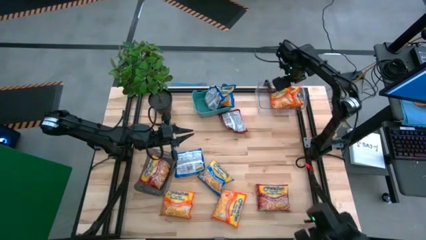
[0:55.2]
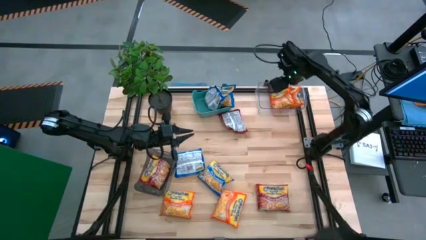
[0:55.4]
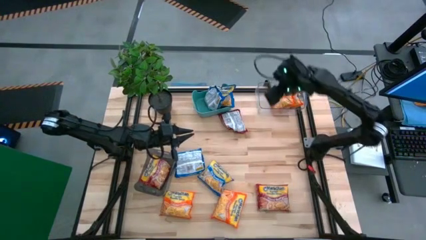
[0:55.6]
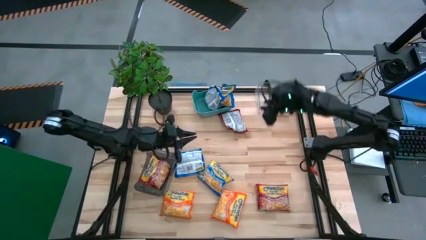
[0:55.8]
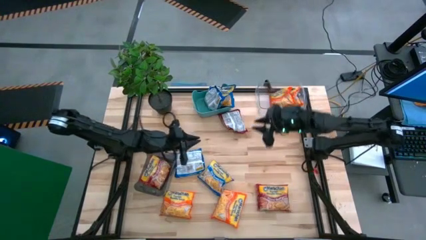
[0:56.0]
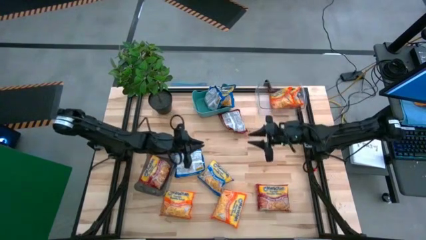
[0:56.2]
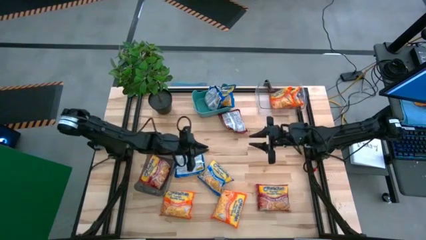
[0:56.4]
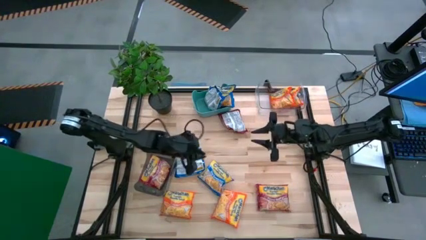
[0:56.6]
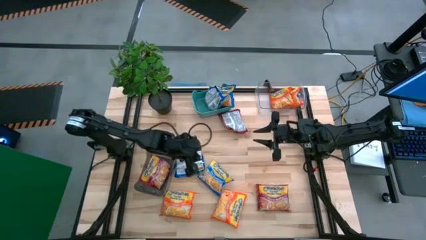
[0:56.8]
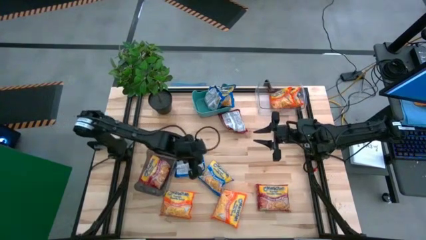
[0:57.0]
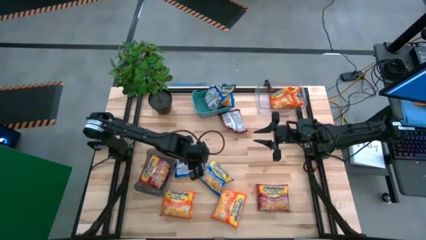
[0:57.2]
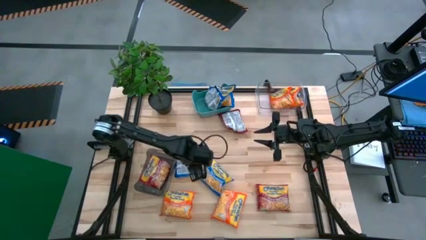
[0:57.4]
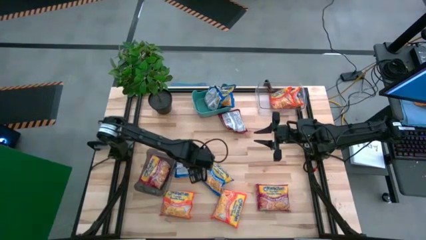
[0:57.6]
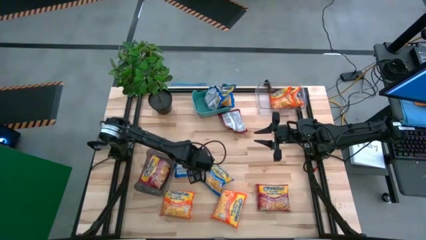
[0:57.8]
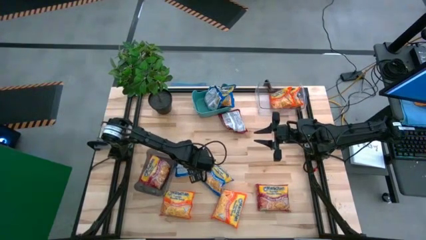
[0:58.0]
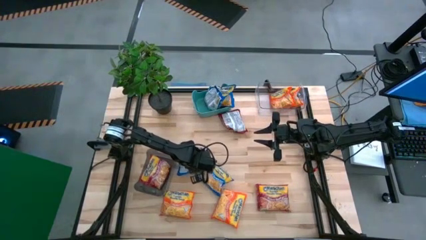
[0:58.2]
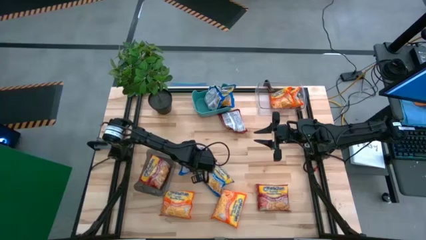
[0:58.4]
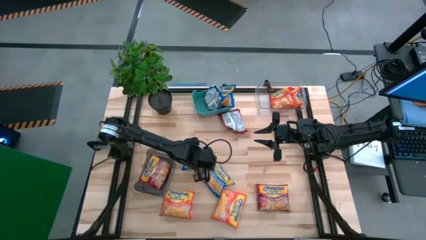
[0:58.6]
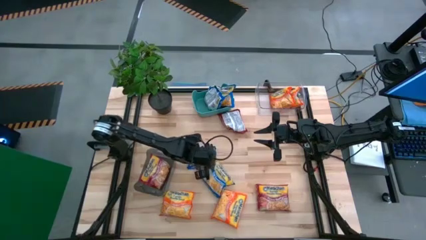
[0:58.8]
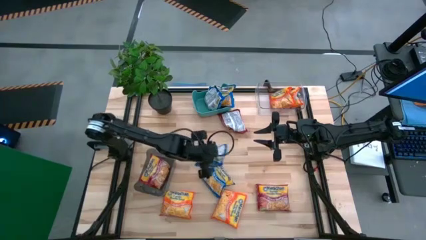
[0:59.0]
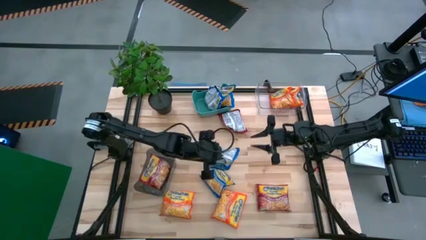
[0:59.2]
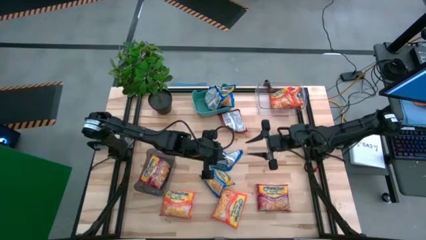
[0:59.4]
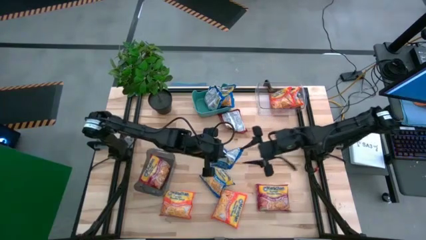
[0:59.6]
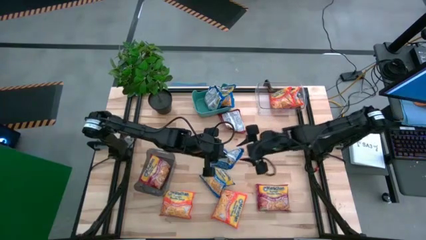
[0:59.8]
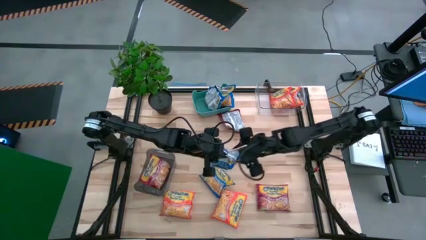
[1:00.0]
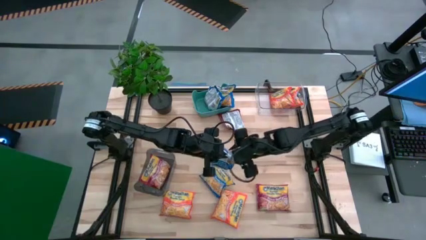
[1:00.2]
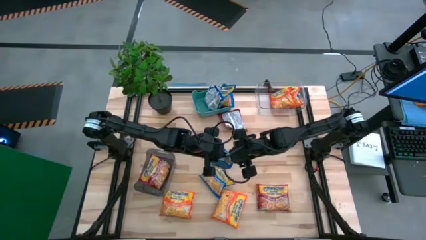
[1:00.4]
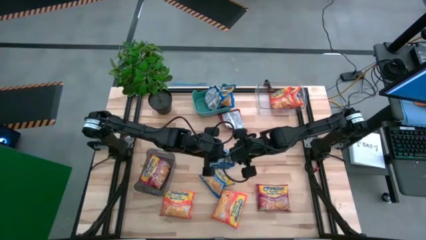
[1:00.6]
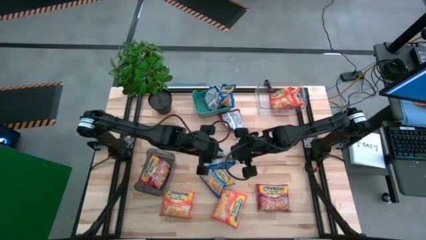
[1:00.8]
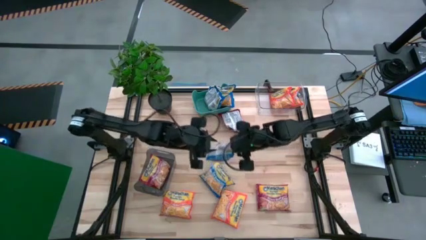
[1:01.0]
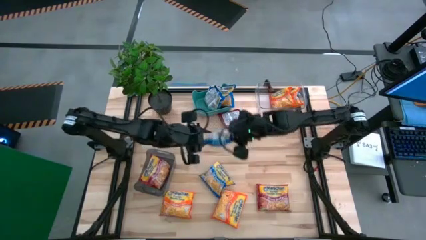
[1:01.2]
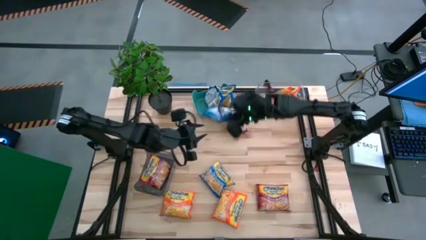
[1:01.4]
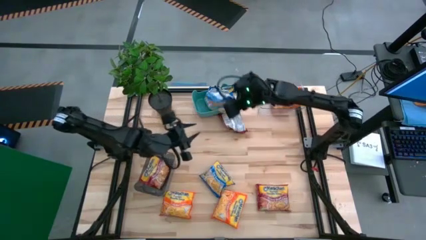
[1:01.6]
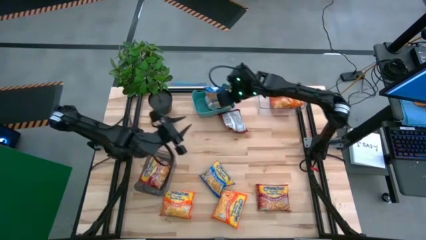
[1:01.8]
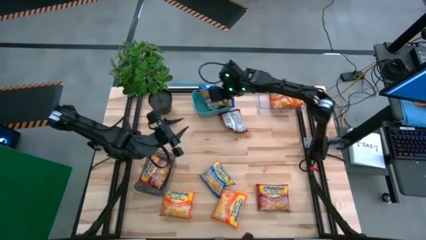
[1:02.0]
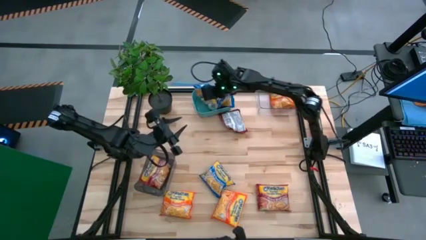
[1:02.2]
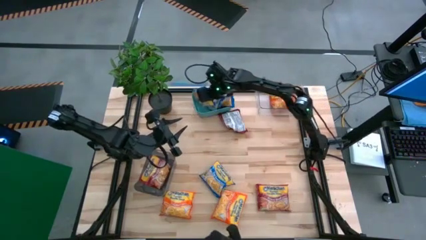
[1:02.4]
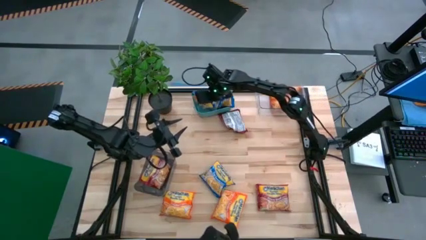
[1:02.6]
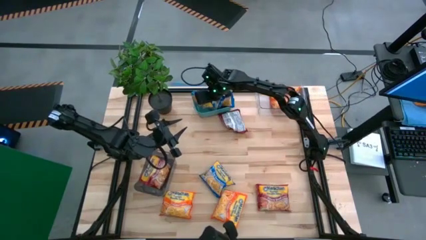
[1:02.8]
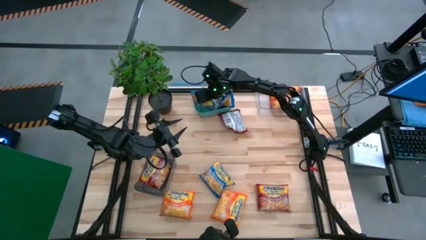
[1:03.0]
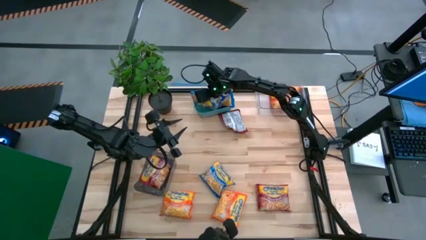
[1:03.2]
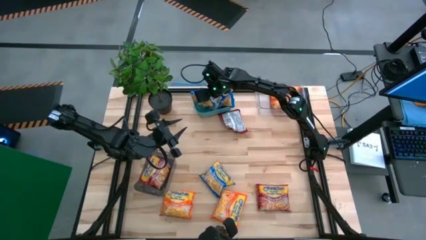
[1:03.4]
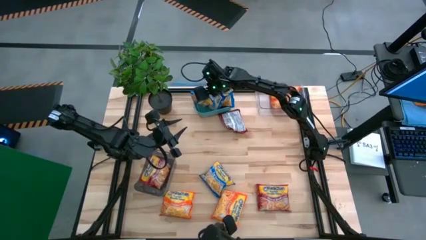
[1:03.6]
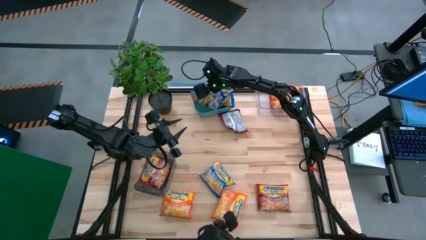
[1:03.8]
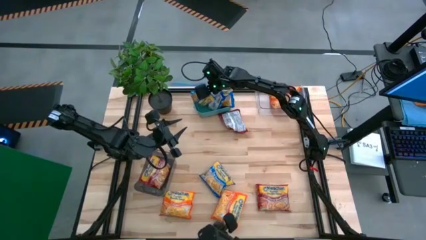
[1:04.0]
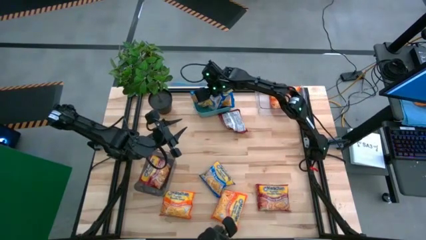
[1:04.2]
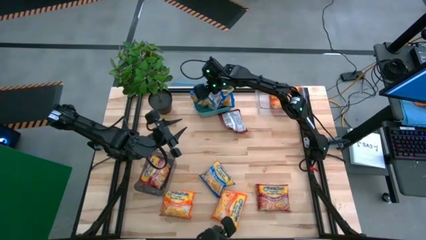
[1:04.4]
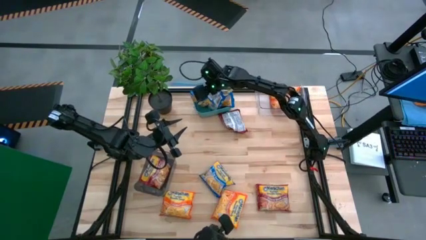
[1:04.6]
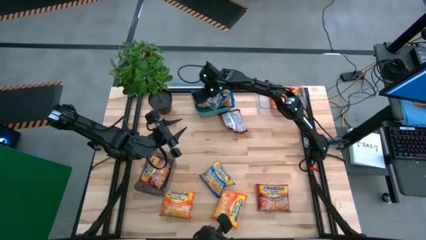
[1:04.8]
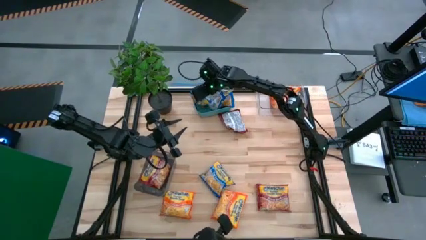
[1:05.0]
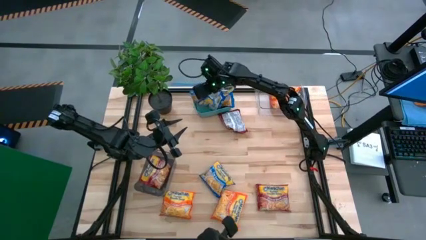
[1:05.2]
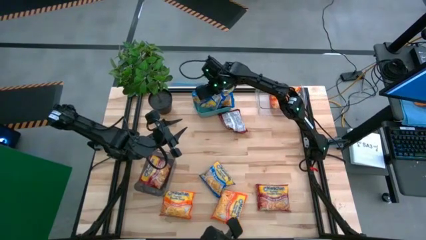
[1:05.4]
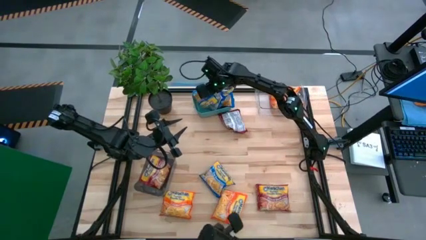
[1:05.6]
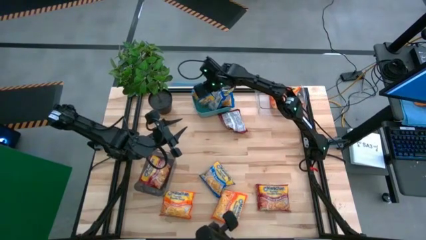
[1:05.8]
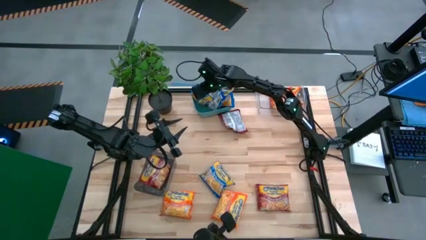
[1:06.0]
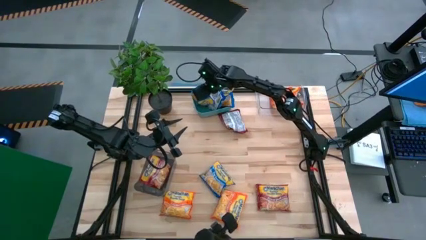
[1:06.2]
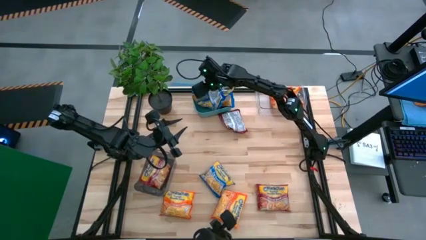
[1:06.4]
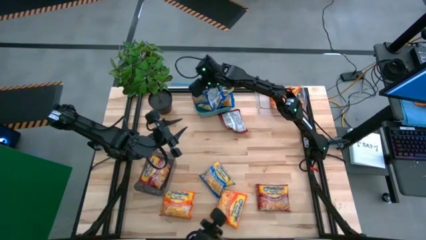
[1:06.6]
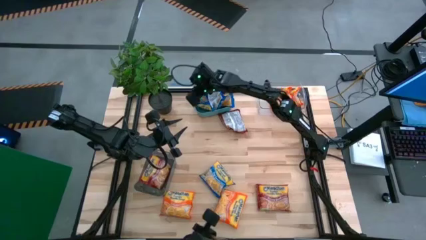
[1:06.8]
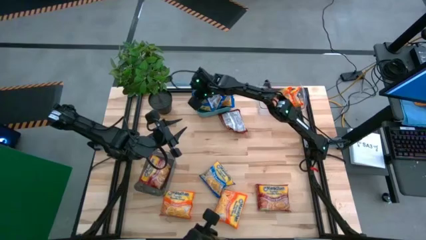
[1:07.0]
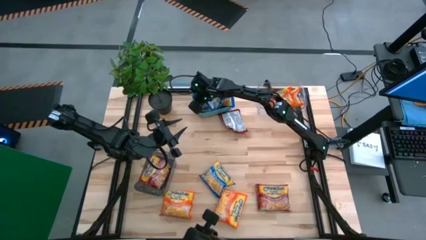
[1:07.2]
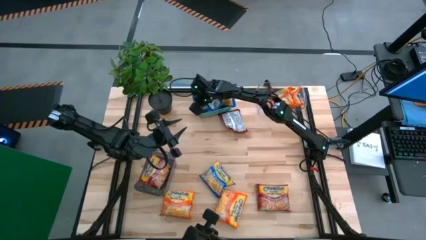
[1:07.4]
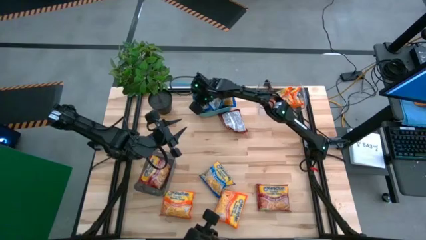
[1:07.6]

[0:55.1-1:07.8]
Task: Sort Maruchan noodles
Put the top blue noodle pack into the green bin

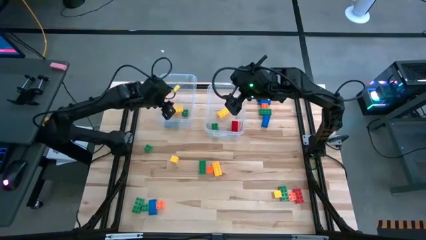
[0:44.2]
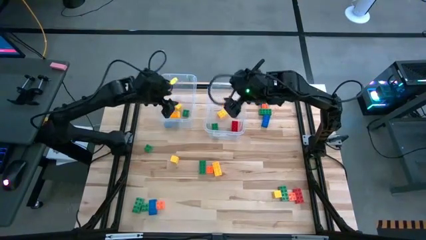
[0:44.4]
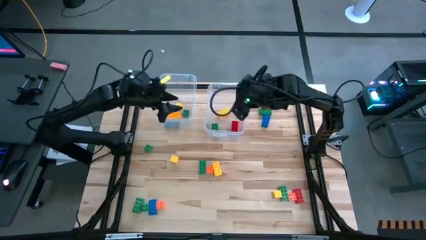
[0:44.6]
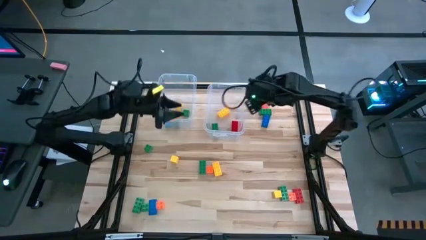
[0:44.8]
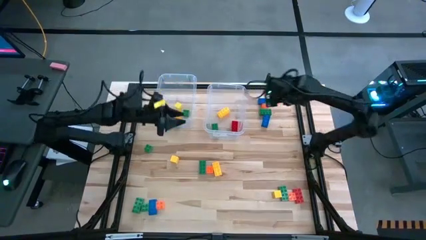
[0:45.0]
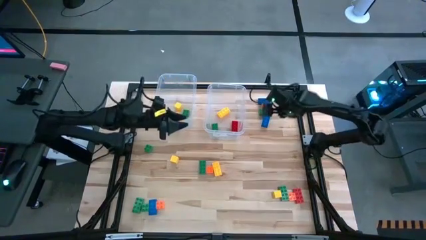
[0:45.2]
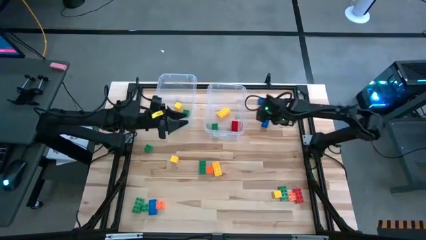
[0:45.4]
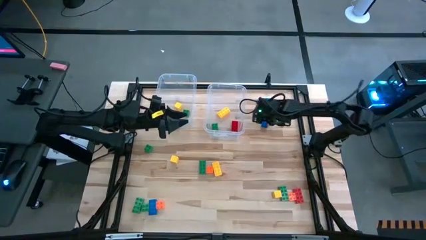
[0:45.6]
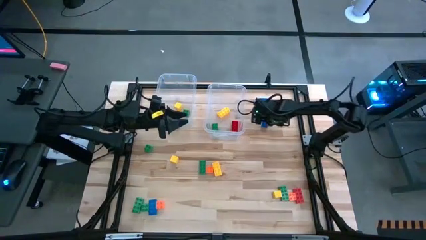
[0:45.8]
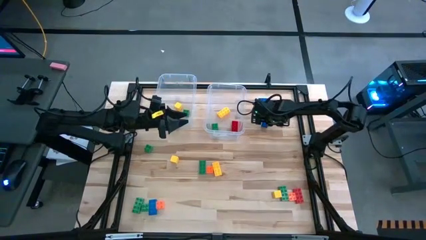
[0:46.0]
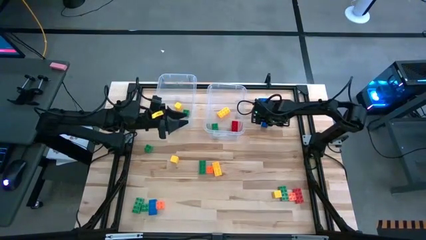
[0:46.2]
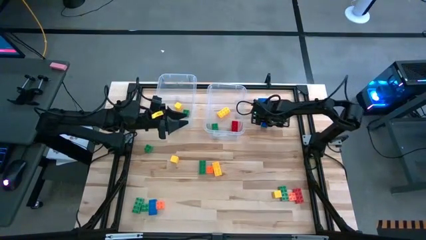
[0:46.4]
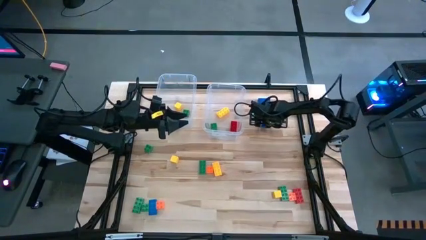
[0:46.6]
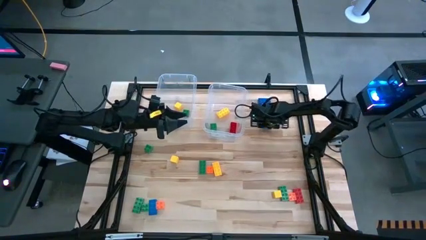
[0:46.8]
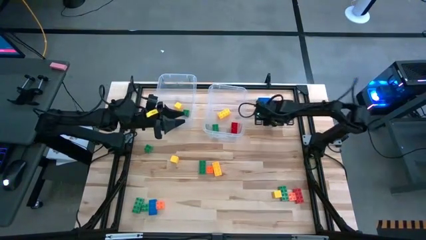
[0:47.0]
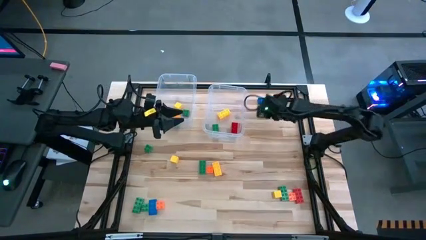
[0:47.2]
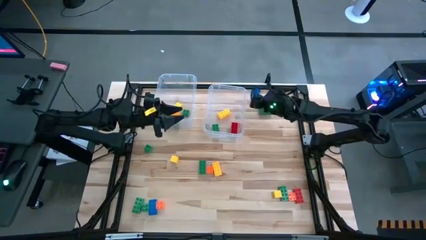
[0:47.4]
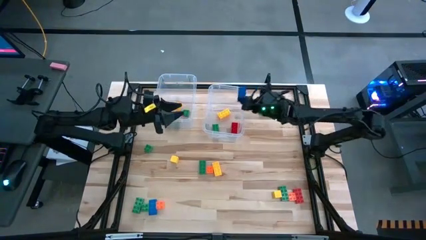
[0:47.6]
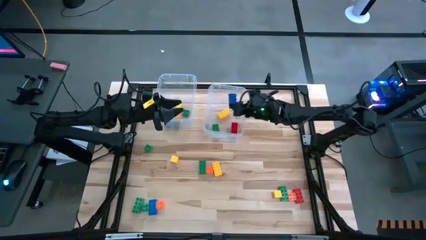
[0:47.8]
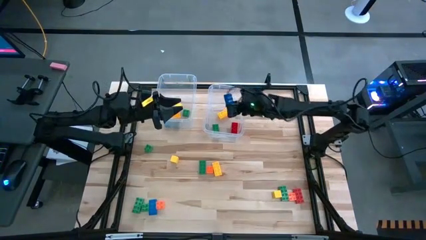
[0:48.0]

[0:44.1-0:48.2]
Task: Sort blocks by size
Put the blue big game piece into the right transparent bin
